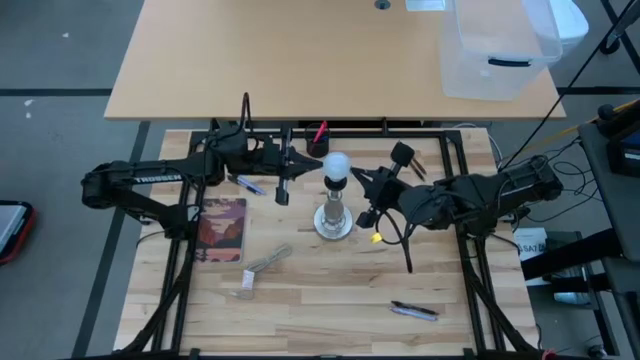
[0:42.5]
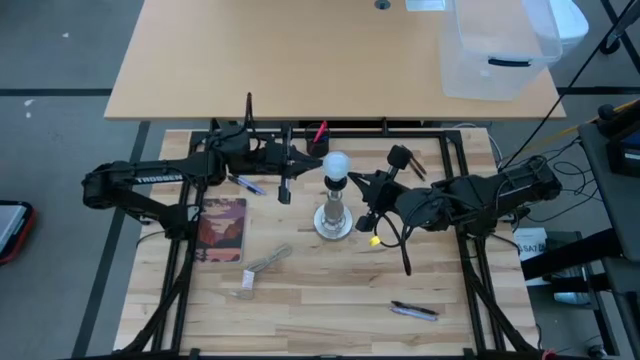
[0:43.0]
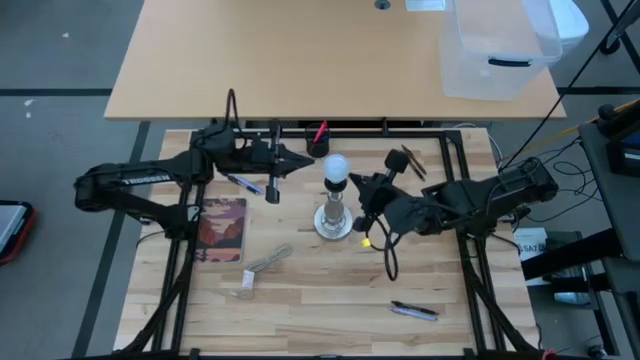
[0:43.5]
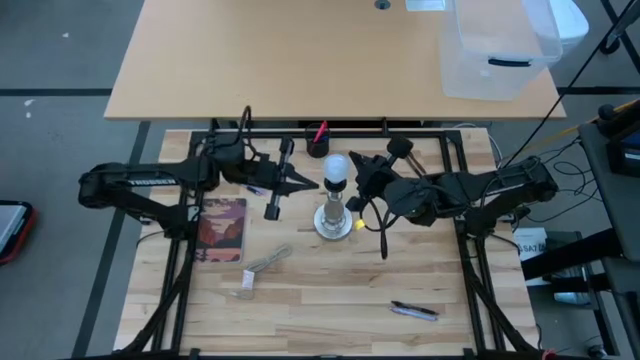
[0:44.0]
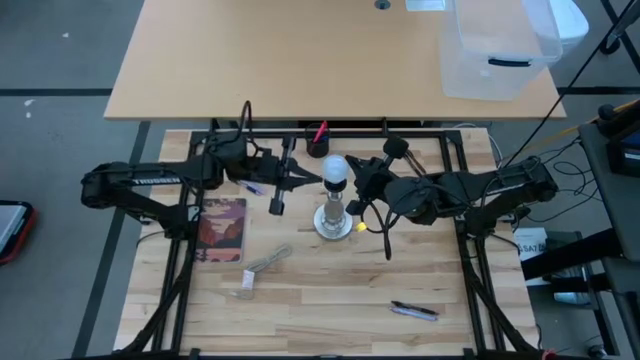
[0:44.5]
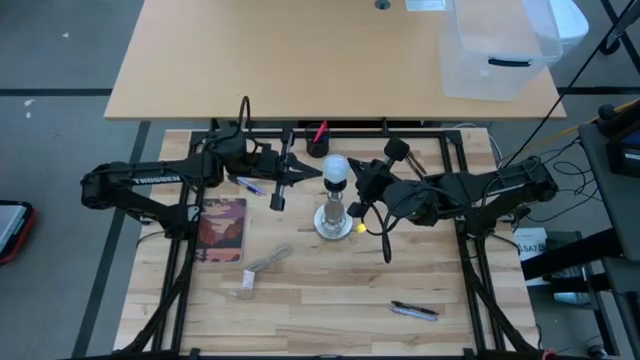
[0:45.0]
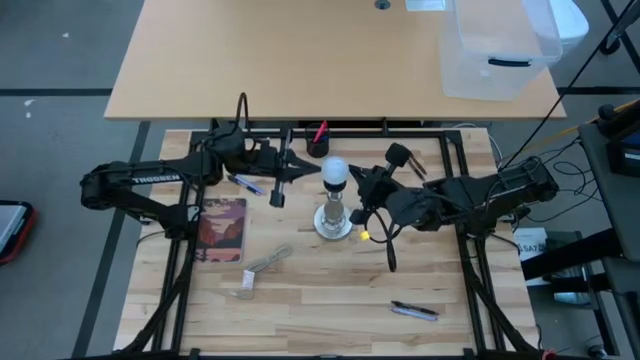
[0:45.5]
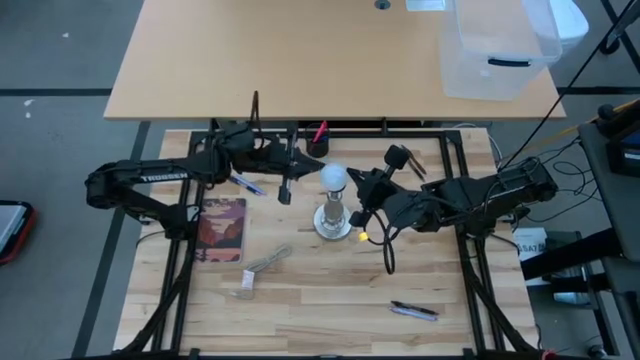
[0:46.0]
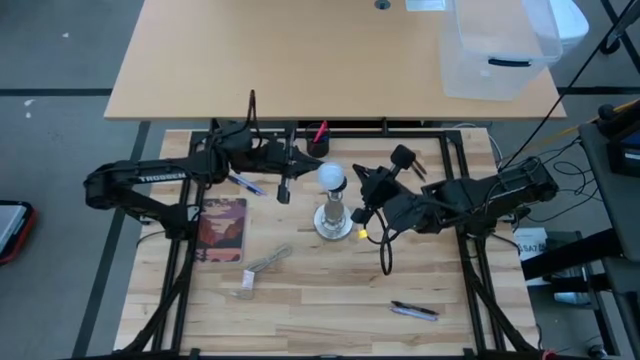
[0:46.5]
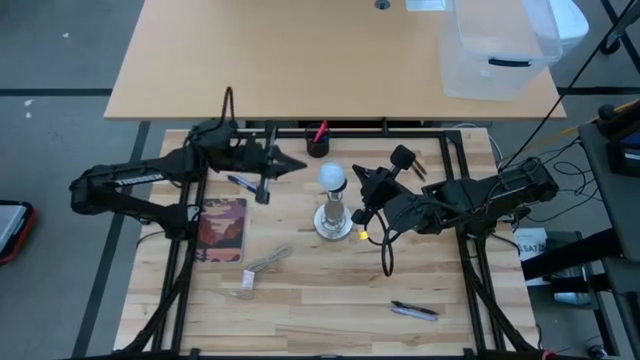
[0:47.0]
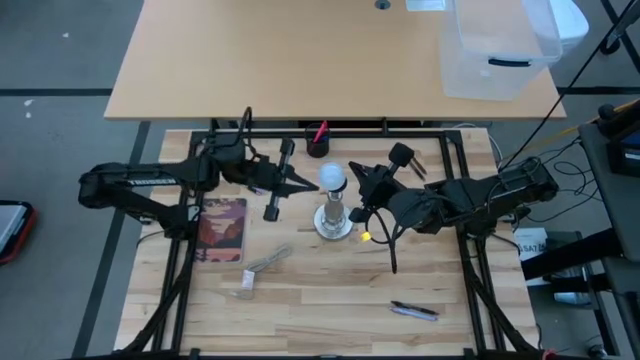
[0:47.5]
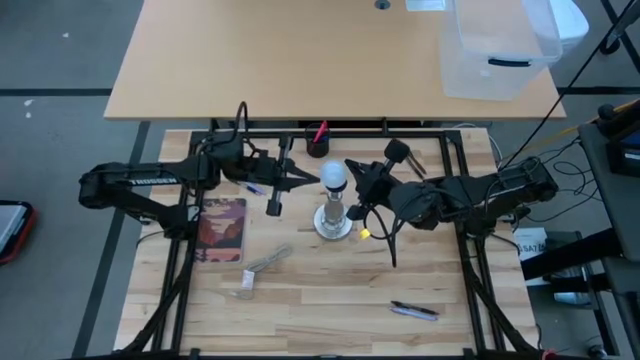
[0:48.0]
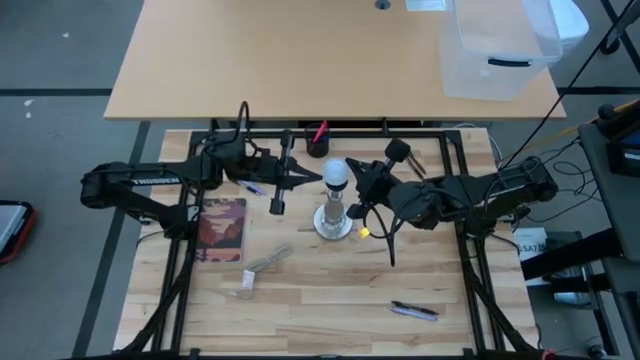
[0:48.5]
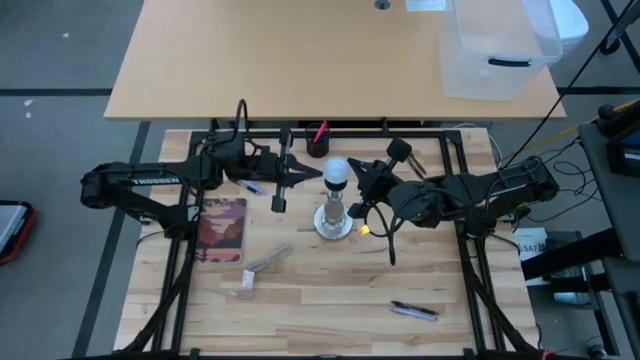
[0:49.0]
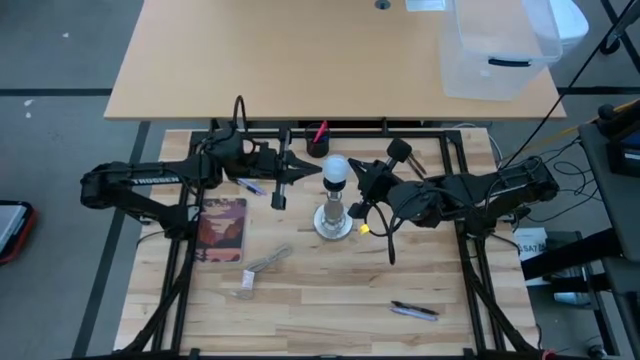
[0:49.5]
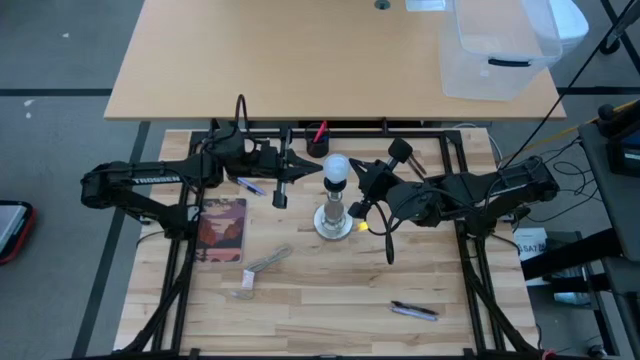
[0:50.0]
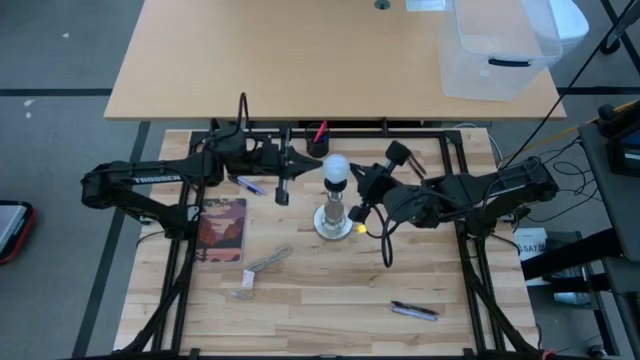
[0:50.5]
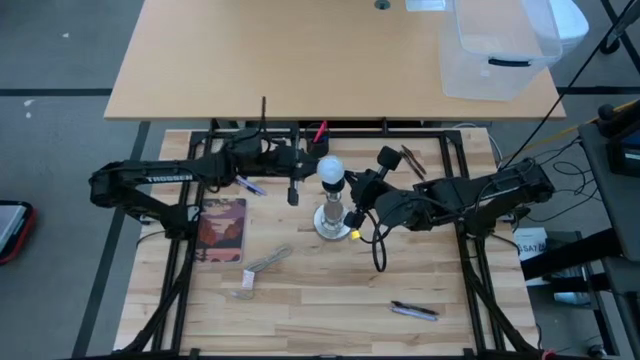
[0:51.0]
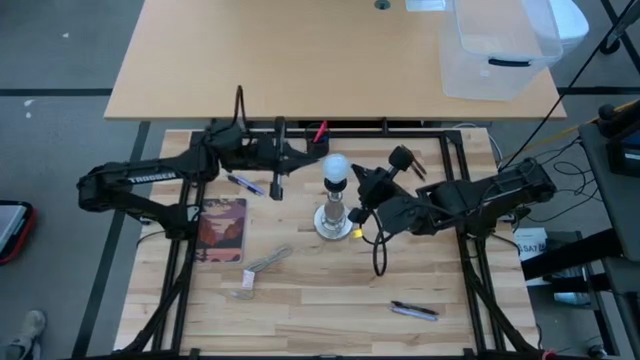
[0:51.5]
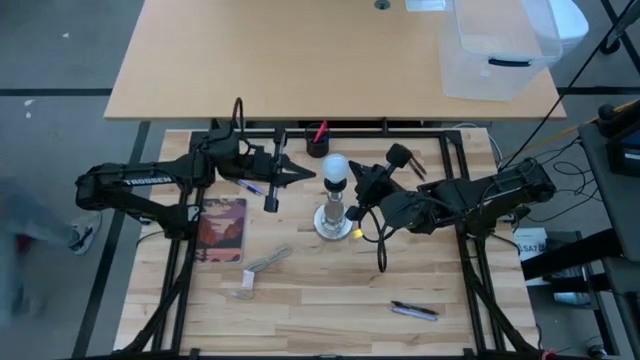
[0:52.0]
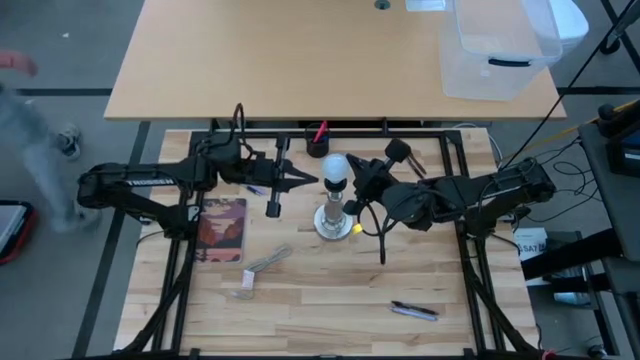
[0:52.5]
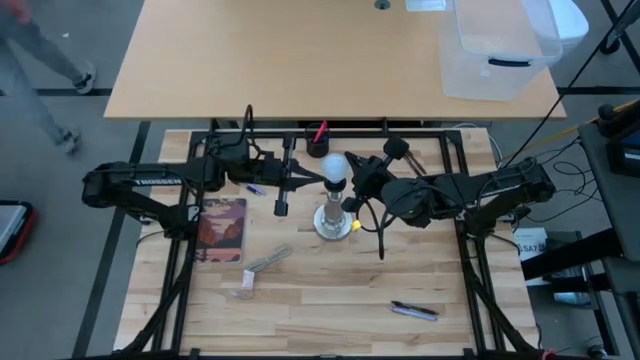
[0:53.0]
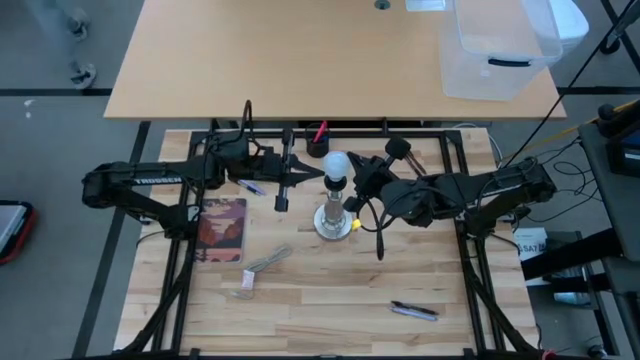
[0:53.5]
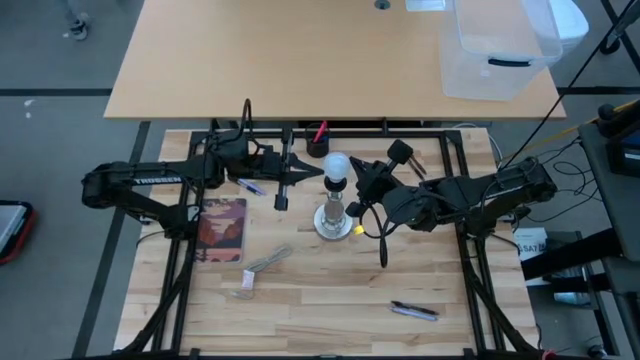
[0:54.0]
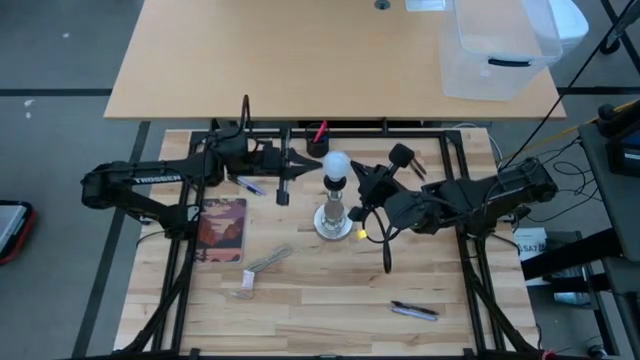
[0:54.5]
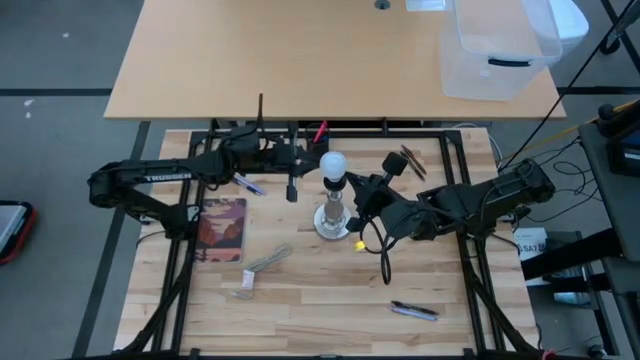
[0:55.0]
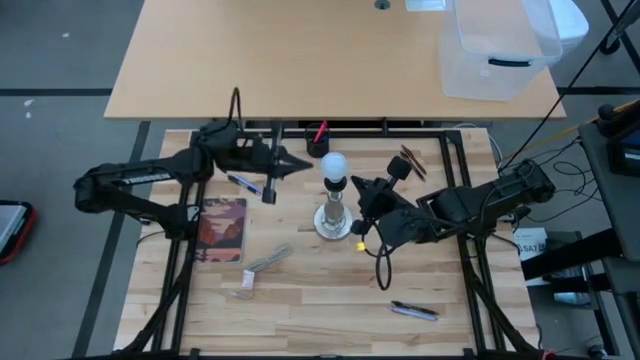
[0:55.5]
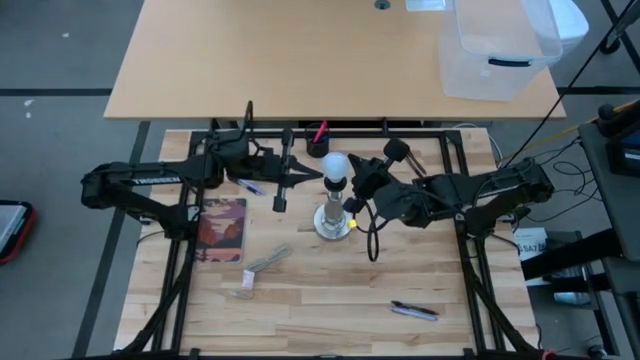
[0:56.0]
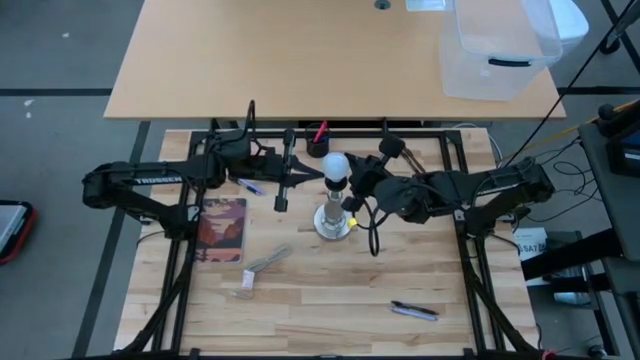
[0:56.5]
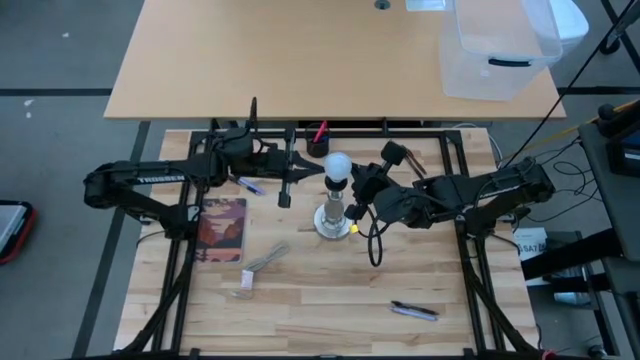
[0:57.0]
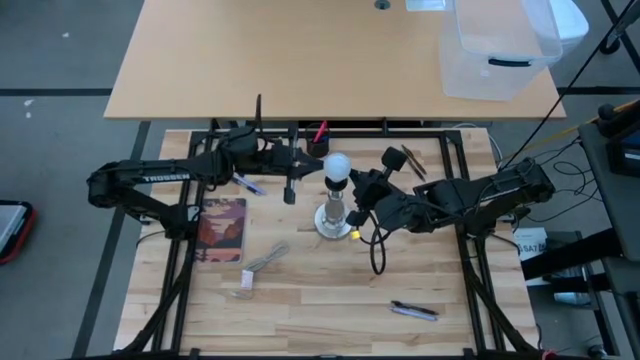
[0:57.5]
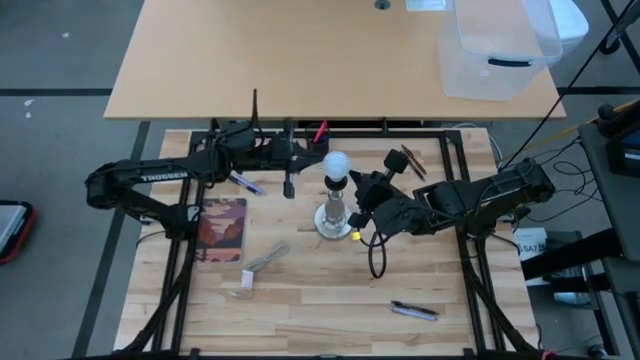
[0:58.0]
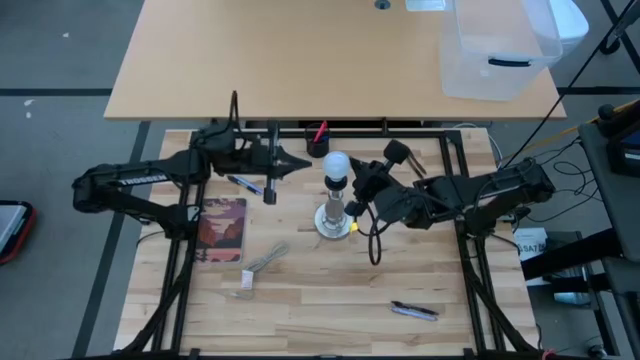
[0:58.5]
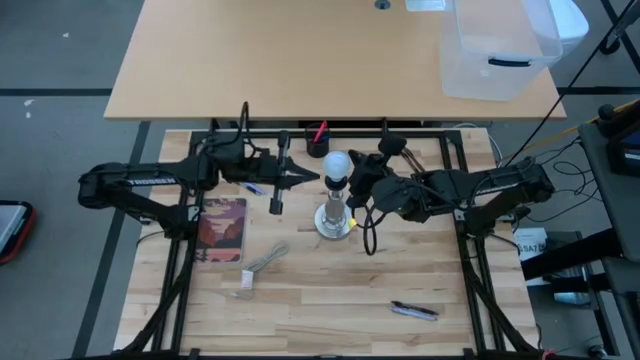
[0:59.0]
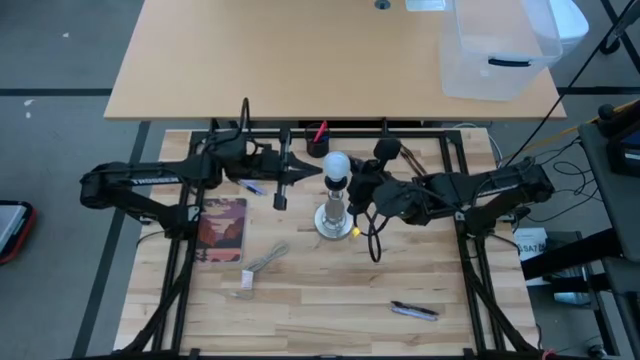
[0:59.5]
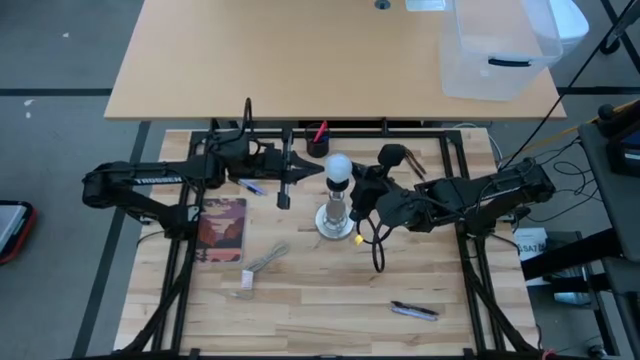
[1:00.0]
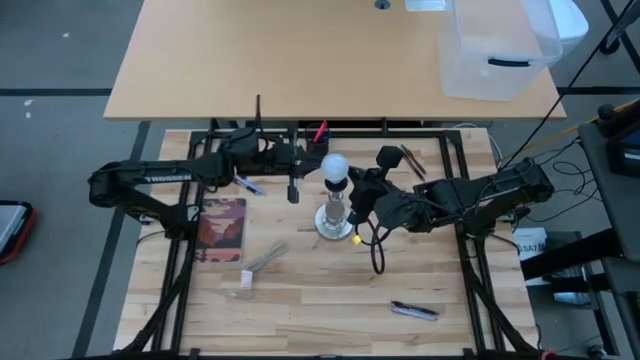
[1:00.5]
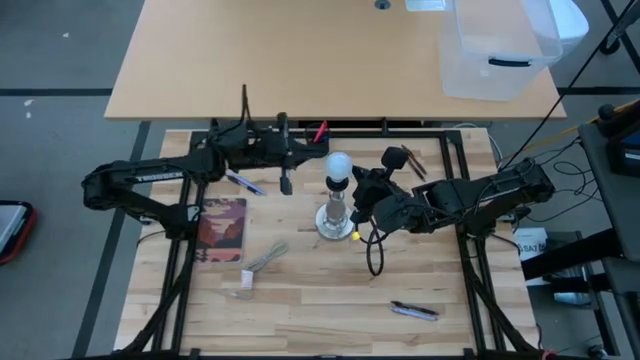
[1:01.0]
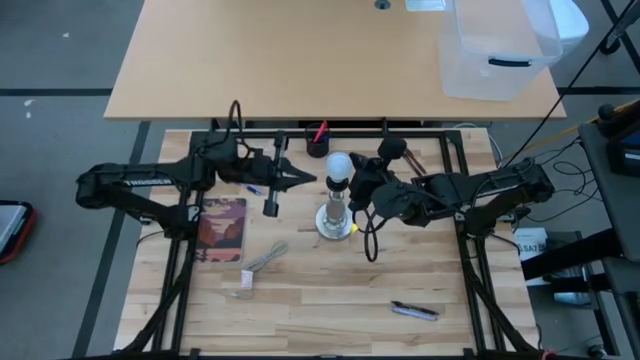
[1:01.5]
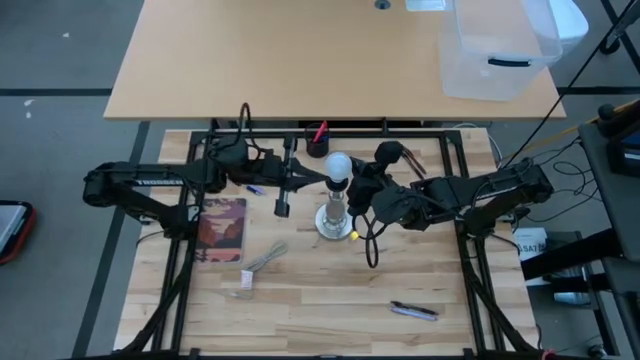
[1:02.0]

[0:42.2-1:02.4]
Task: Screw lightbulb
Insert the lightbulb into the desk lamp

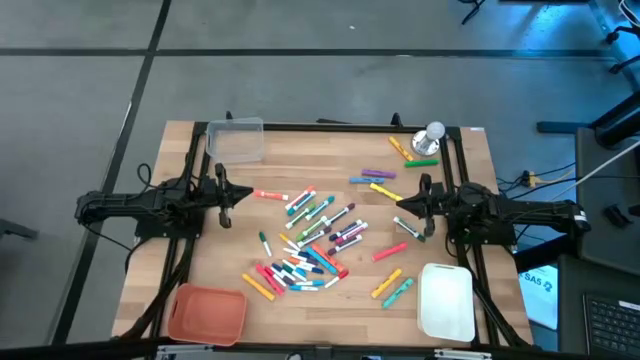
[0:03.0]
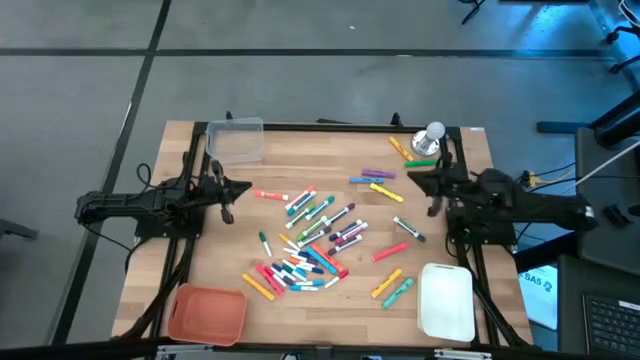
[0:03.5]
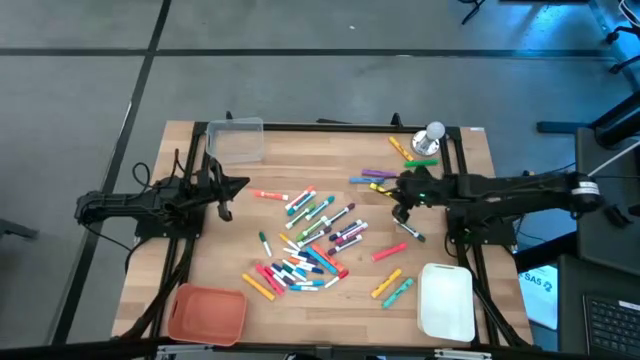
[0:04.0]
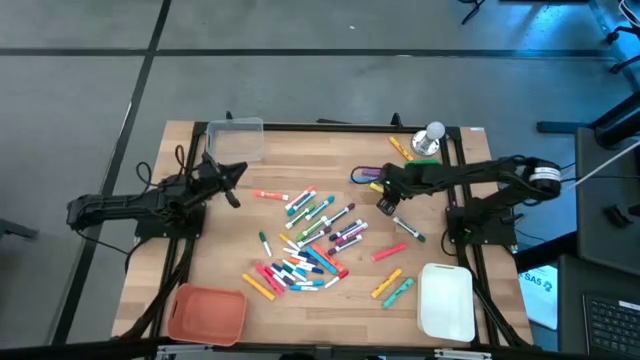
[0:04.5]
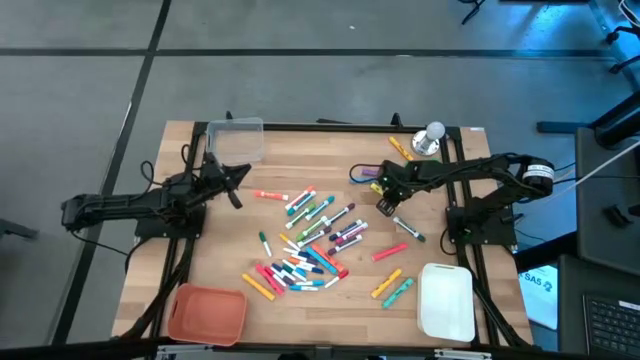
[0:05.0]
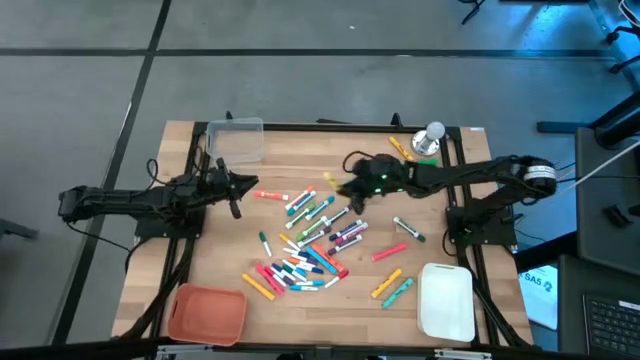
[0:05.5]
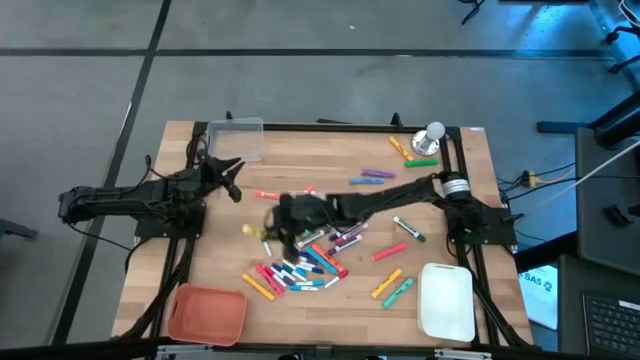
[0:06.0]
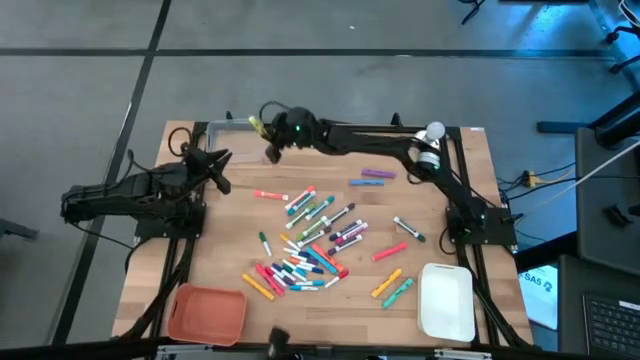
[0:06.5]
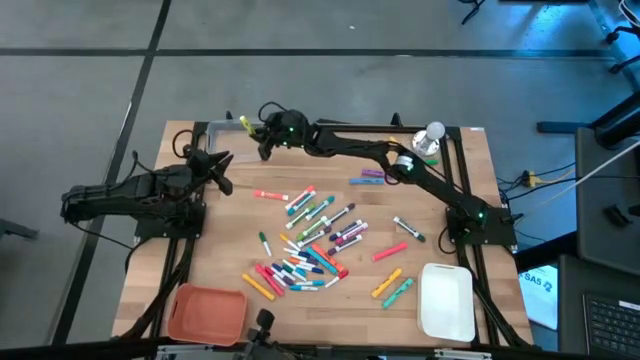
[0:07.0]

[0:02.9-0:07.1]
Task: Pick & Place Markers
Put the yellow pen into the transparent bin
